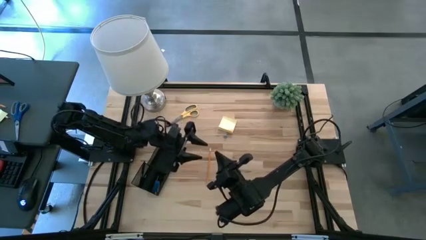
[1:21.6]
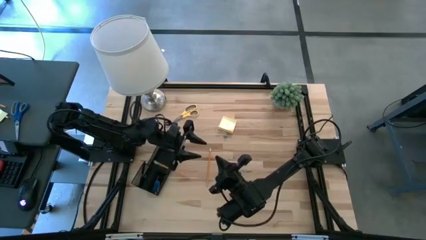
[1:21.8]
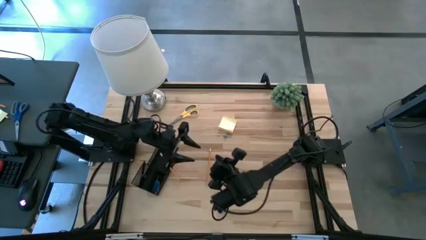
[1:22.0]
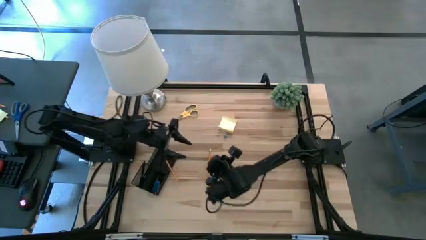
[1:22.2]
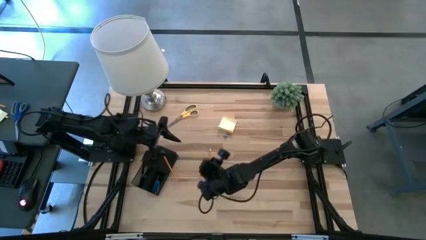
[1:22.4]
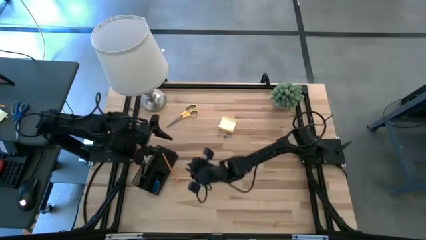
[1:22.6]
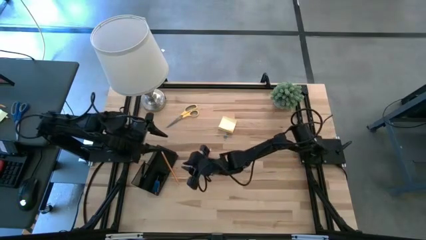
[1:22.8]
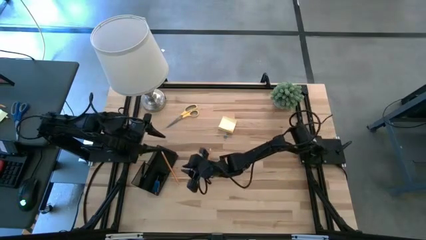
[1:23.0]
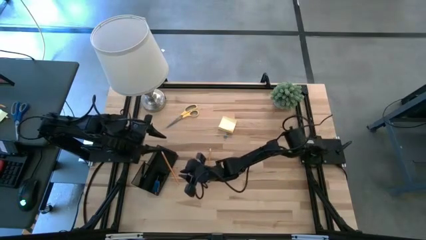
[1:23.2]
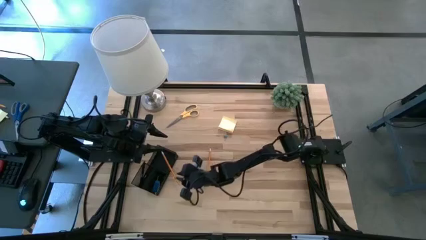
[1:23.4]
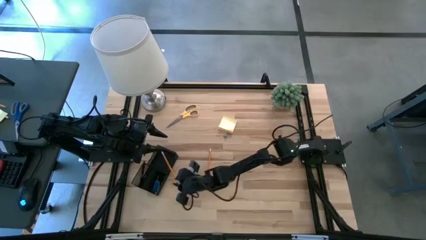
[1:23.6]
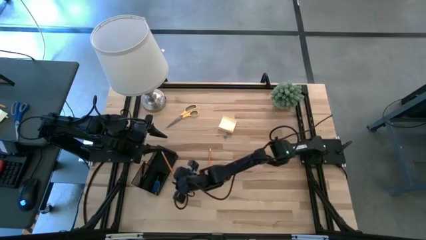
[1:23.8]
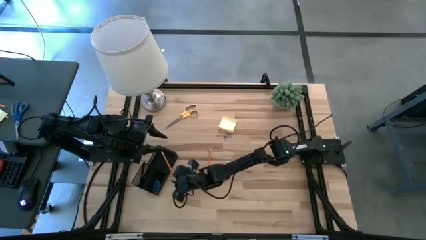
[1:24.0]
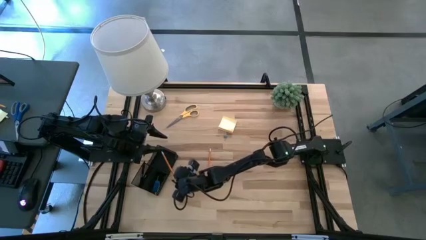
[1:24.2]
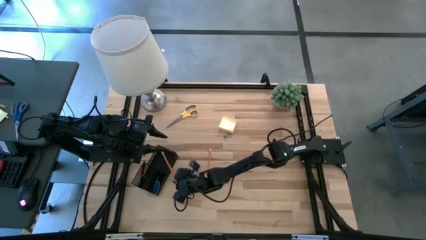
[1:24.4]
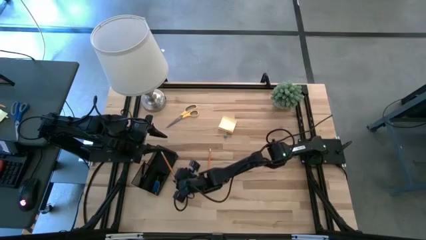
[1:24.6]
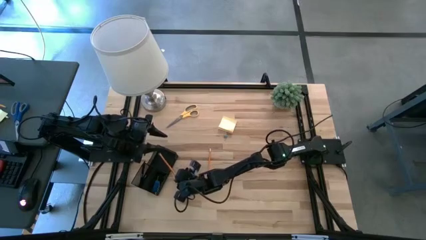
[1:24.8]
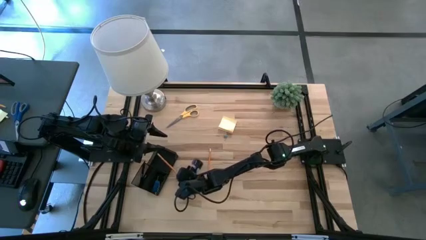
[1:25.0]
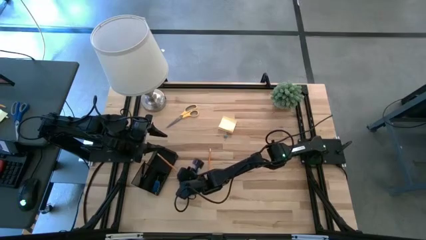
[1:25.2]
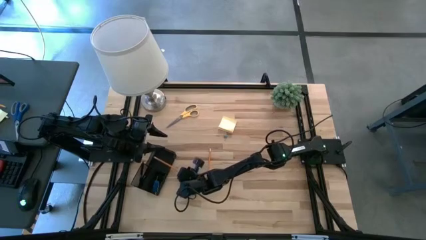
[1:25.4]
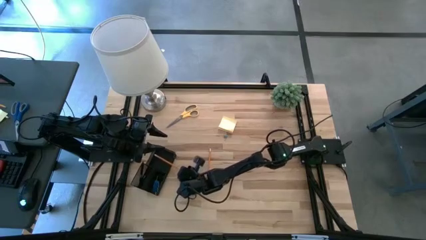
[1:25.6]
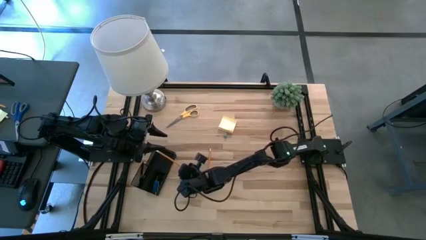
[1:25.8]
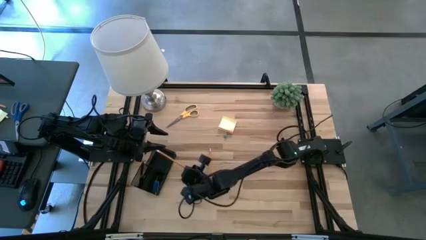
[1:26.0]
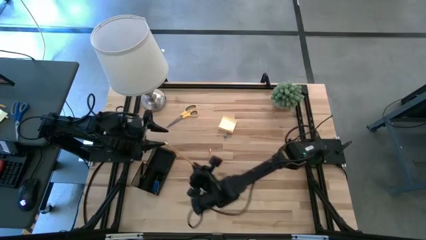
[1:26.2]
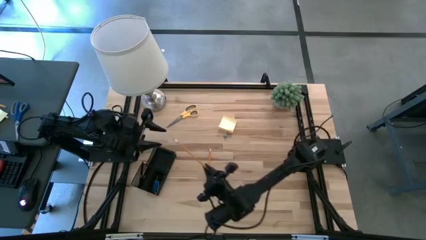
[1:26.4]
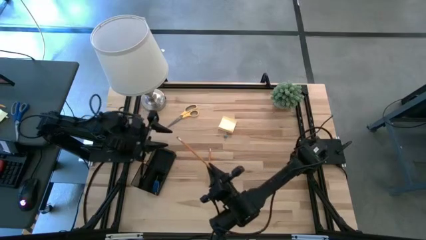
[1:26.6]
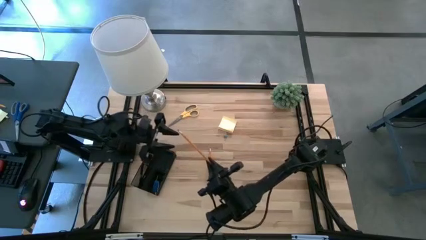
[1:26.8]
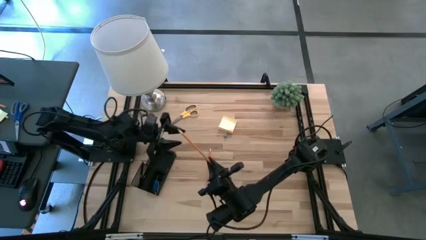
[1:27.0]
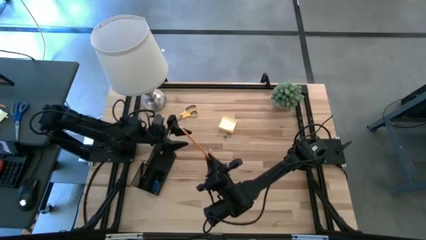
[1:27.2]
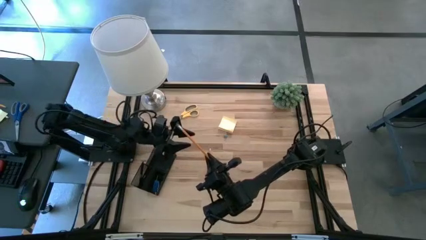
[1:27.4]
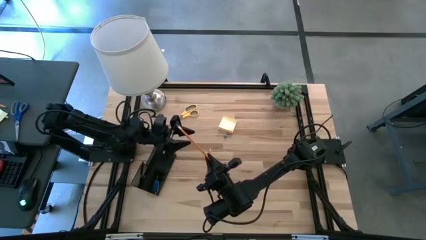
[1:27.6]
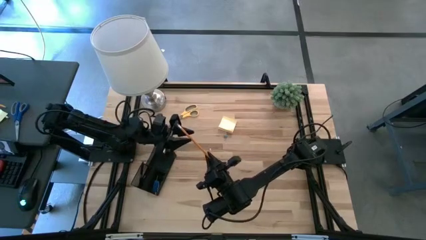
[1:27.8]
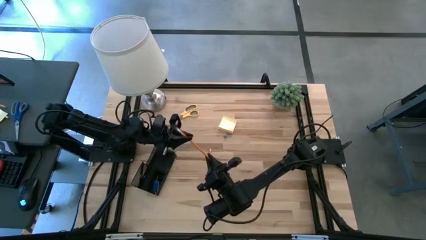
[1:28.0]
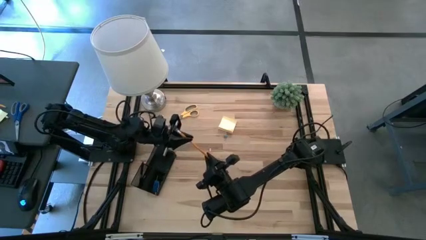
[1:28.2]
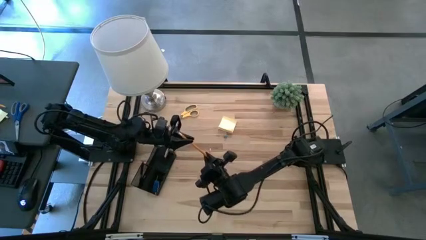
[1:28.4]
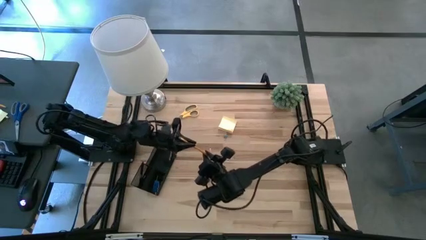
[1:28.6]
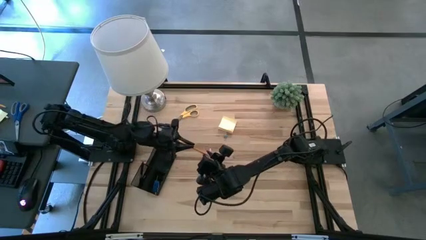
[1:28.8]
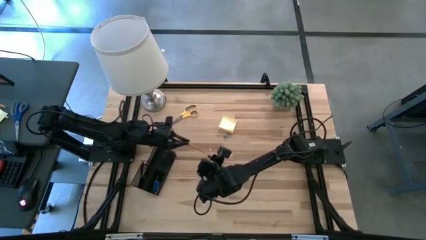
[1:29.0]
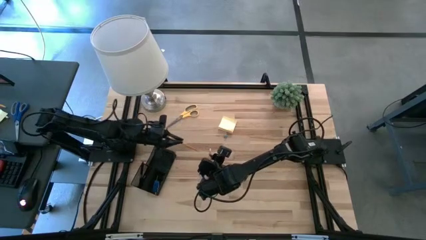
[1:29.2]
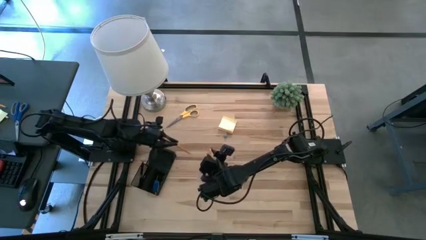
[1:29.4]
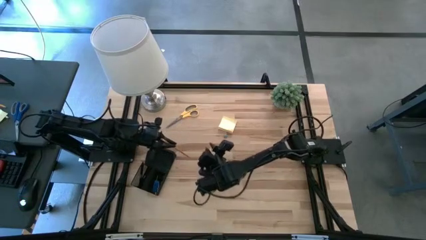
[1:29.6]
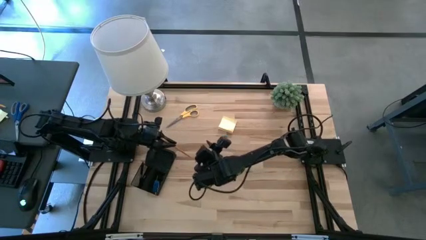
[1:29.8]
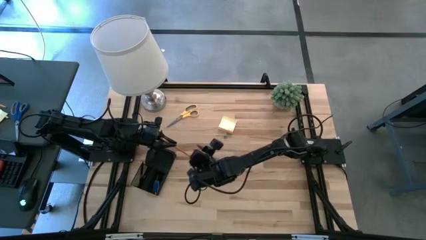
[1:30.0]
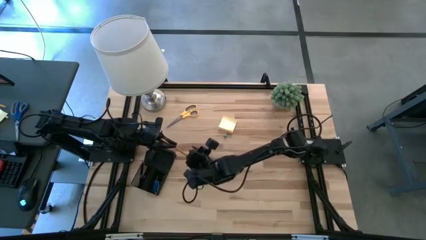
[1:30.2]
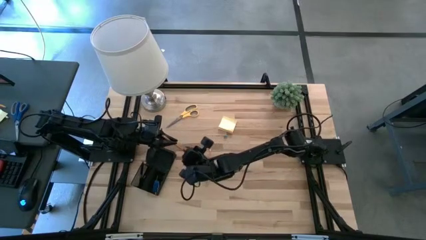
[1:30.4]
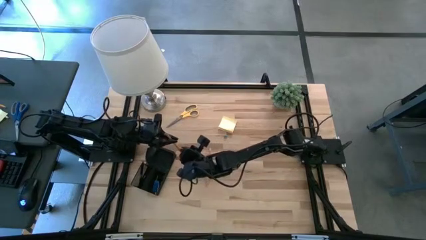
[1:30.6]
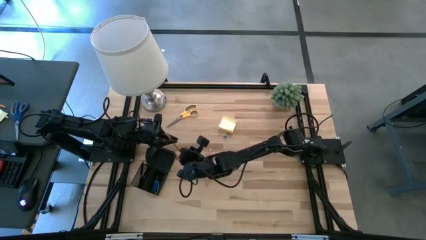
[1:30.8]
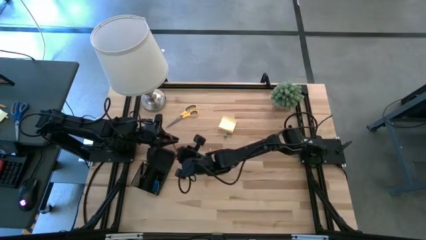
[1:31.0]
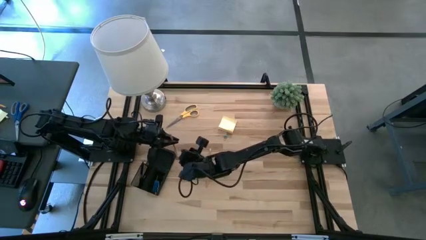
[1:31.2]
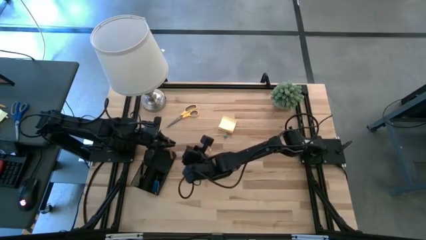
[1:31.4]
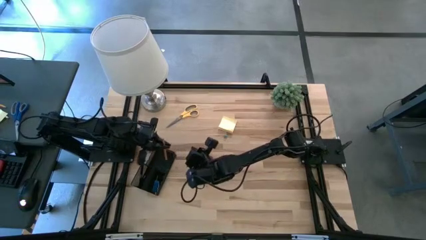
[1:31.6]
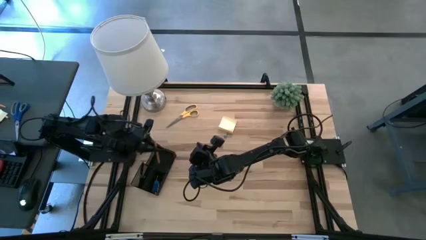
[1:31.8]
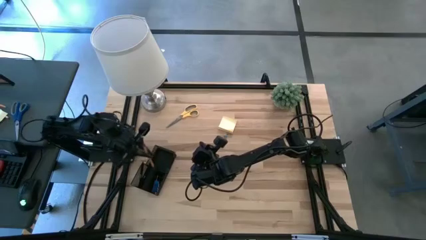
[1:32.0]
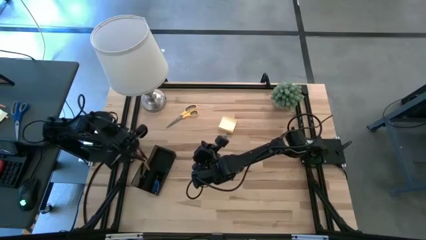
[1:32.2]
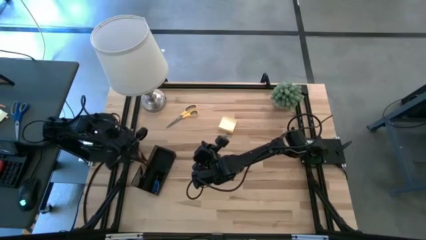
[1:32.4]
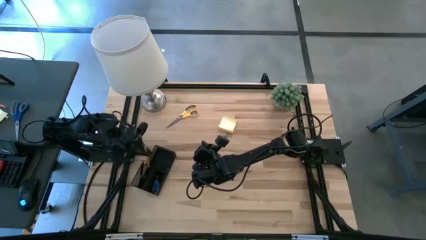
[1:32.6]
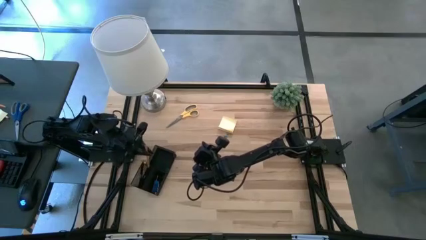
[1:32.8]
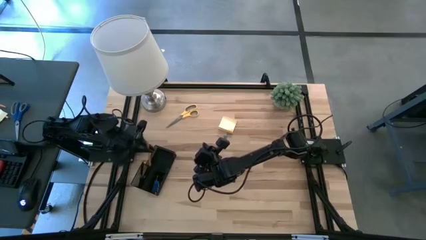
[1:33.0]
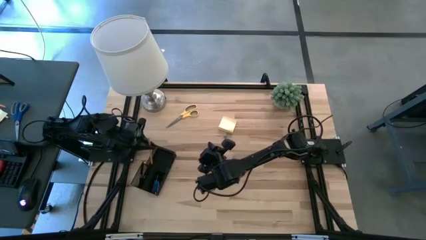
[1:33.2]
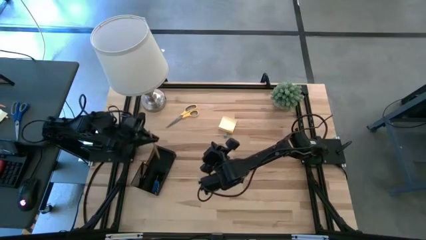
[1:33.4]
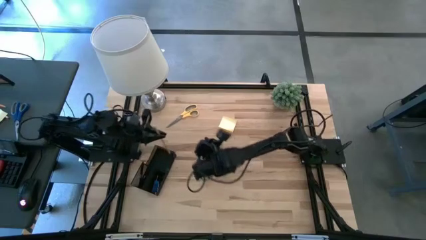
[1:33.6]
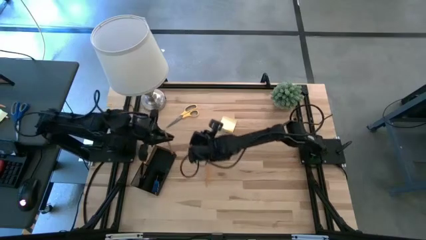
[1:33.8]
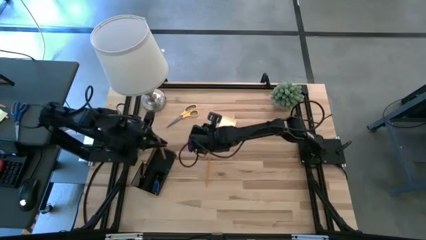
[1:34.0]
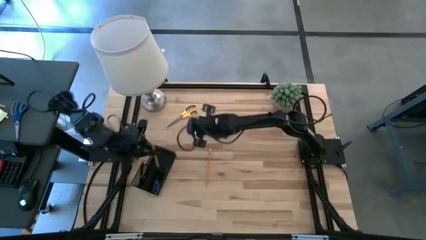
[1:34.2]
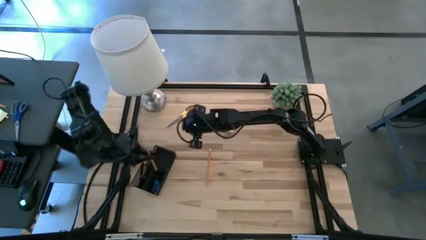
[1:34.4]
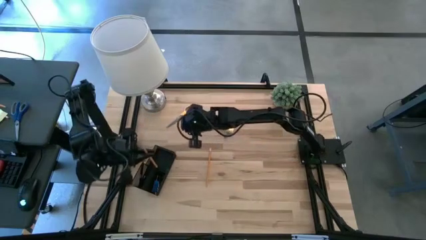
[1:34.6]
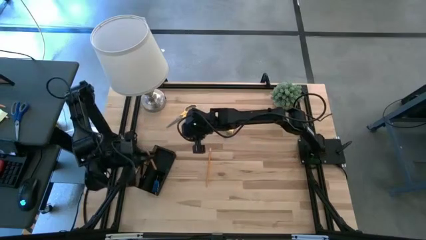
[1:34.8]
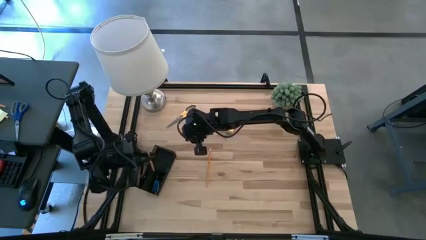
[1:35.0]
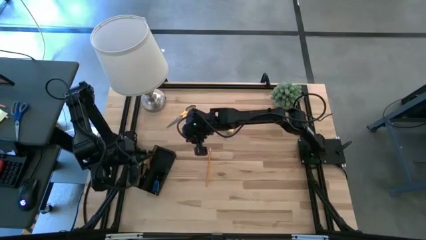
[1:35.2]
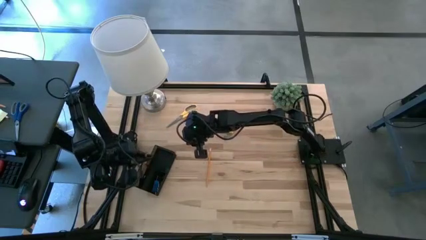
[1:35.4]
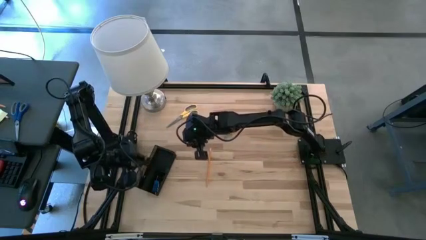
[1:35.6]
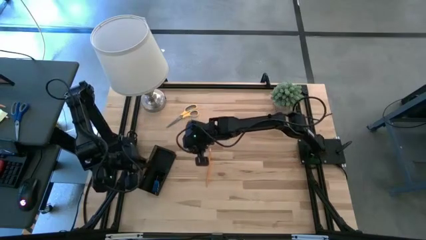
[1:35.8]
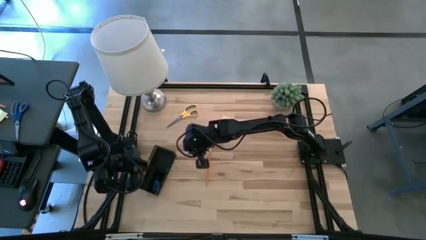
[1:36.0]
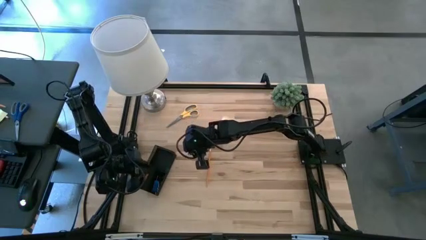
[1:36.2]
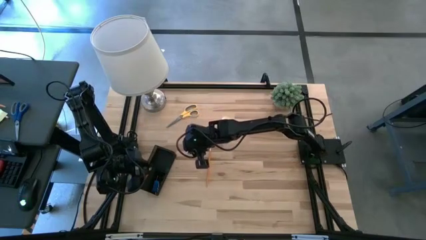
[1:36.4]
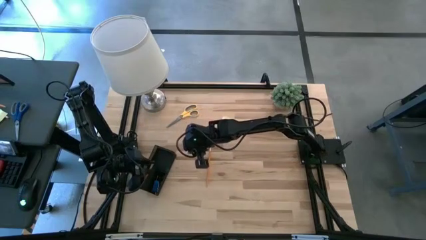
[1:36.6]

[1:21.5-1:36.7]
Task: Pick and place office supplies into organizer
Put the yellow pencil into the black desk organizer

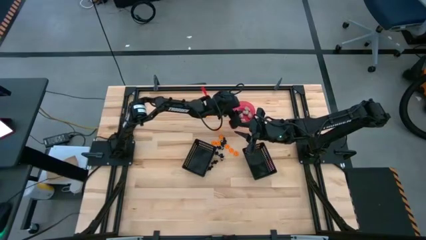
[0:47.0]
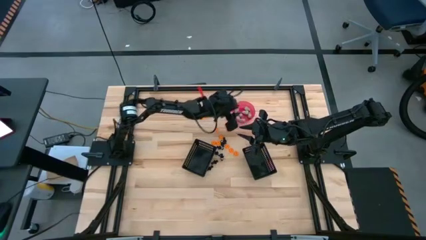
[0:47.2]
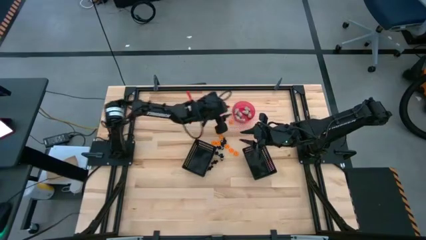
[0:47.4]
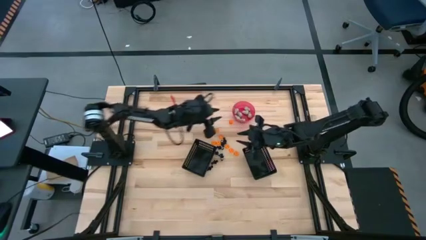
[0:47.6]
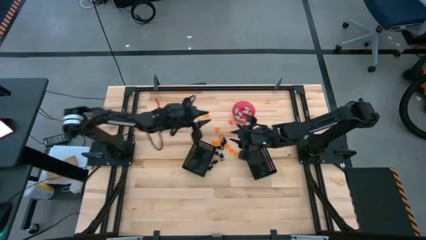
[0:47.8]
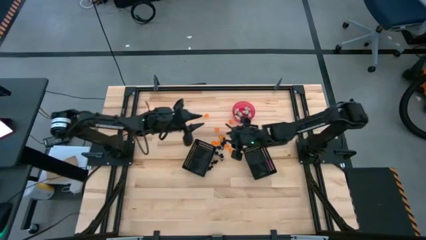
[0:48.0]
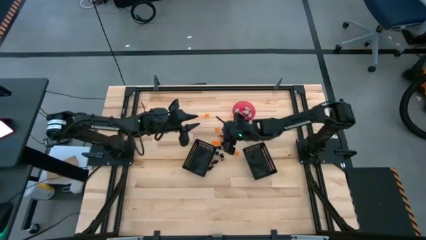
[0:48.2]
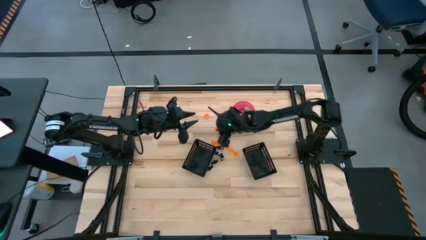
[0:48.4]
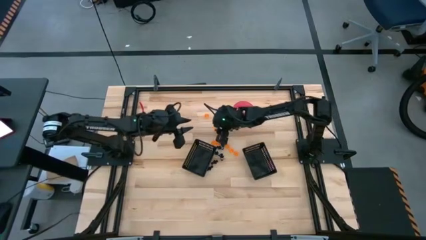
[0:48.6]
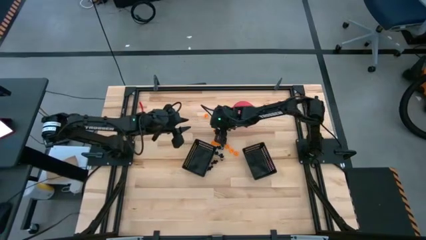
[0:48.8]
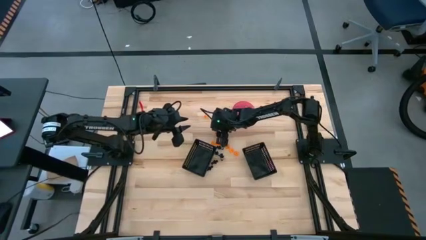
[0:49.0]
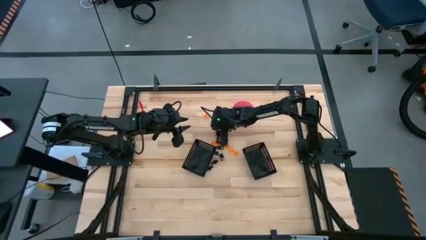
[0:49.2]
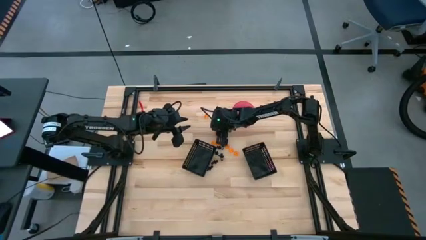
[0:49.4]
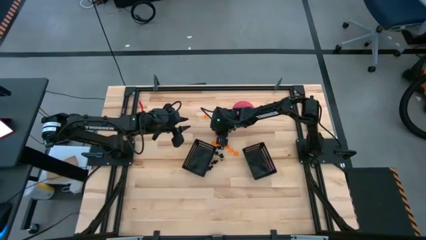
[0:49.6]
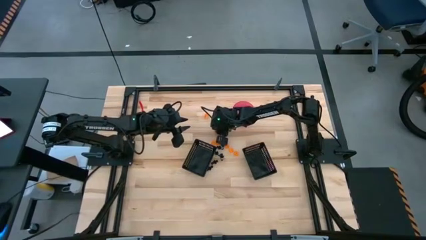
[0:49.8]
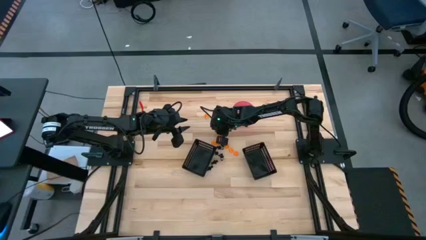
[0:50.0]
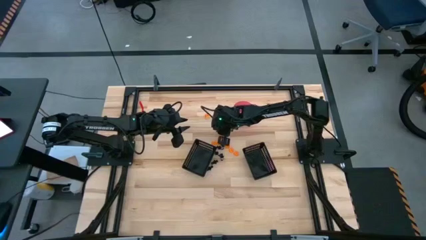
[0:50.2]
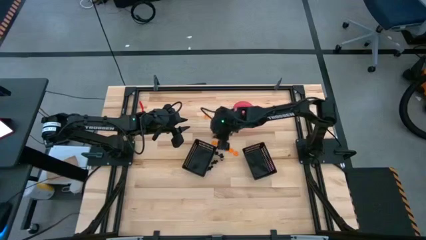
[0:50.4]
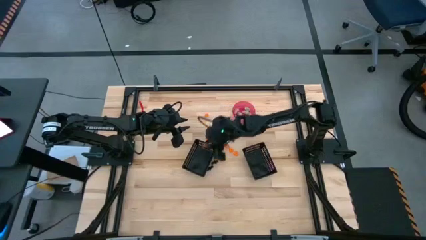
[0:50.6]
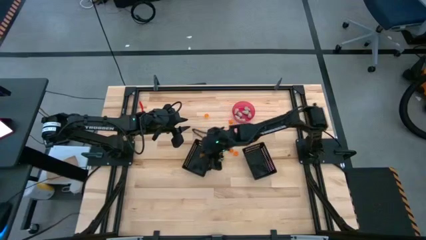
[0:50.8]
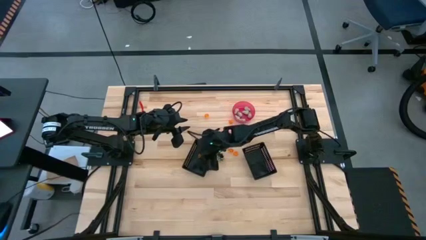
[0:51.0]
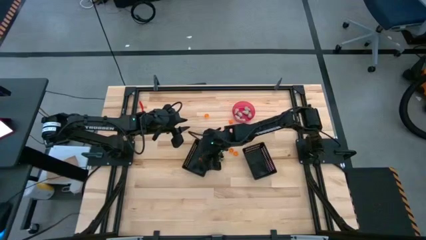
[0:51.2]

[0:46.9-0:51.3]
Task: Sort Halloween decoration
Put the orange pumpkin toy into the left black bin
